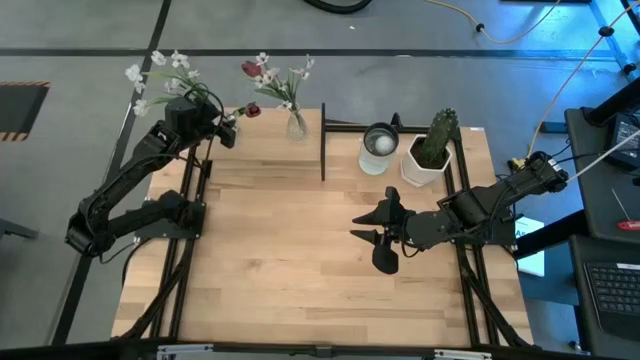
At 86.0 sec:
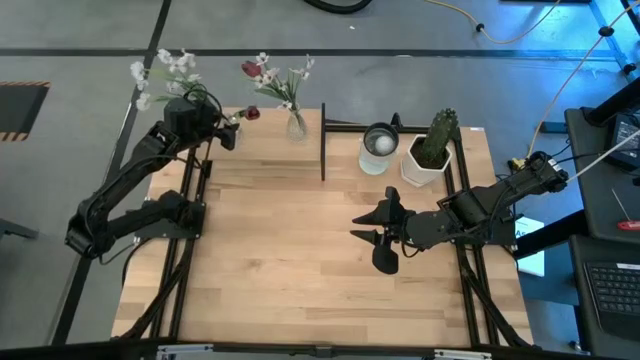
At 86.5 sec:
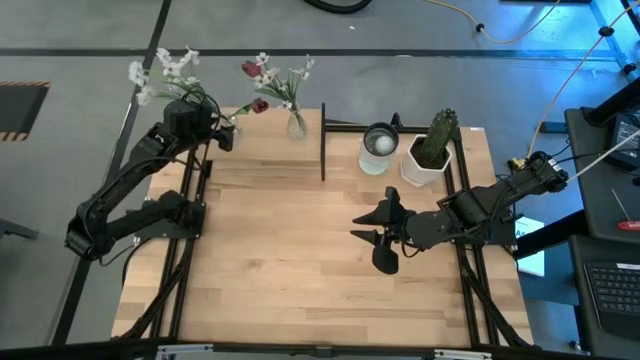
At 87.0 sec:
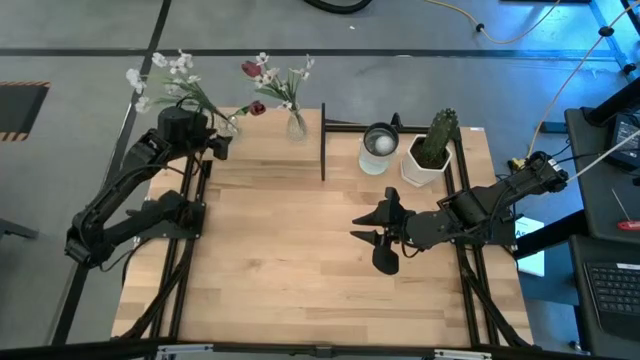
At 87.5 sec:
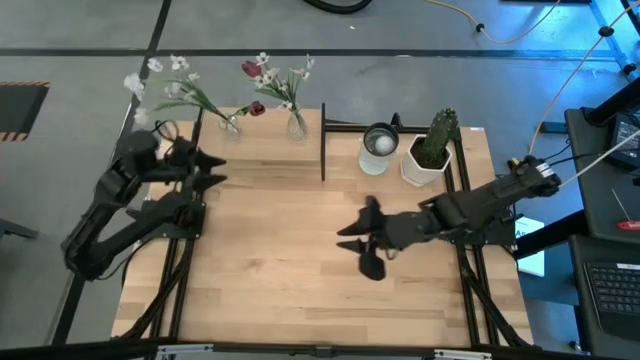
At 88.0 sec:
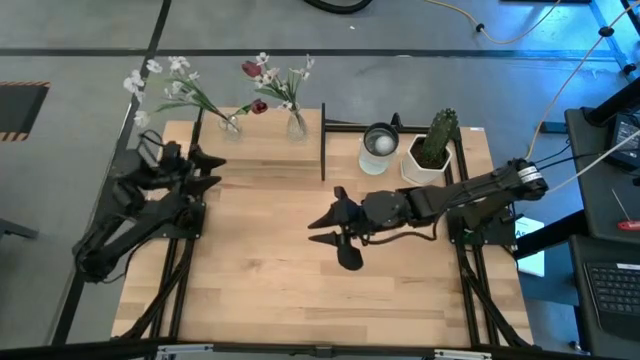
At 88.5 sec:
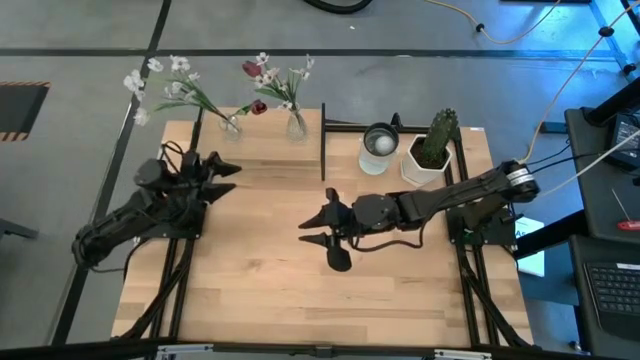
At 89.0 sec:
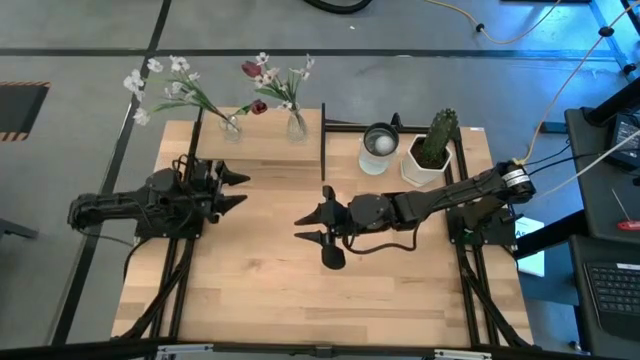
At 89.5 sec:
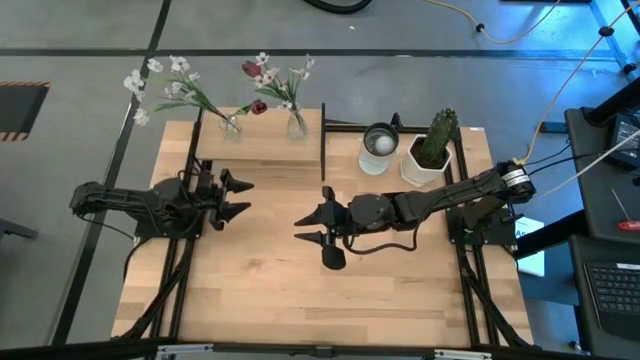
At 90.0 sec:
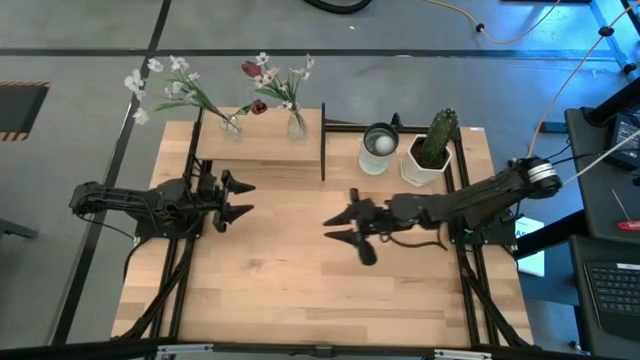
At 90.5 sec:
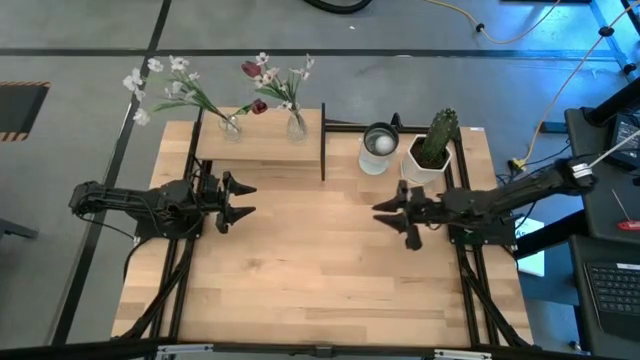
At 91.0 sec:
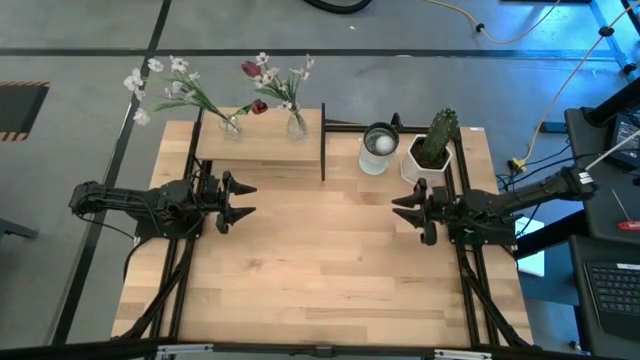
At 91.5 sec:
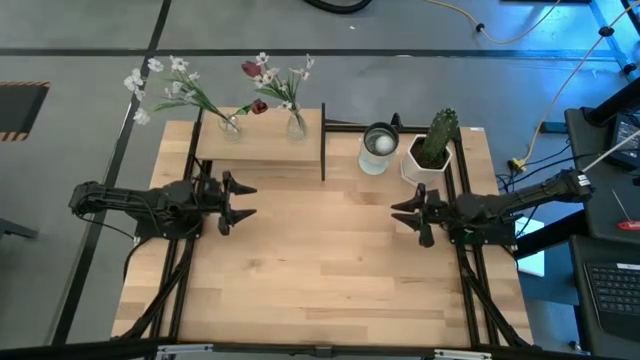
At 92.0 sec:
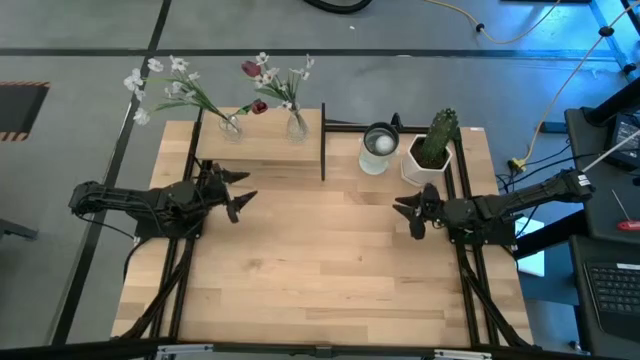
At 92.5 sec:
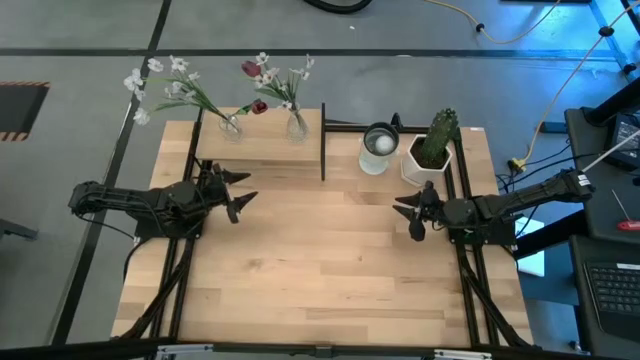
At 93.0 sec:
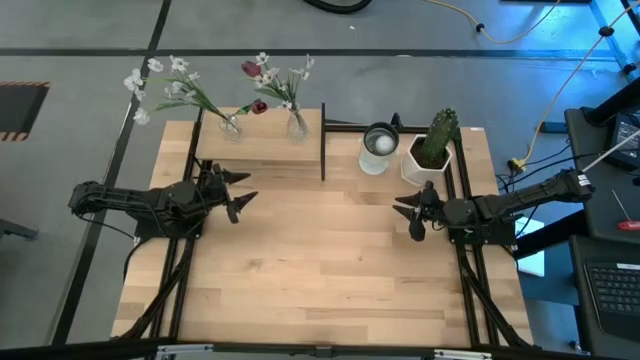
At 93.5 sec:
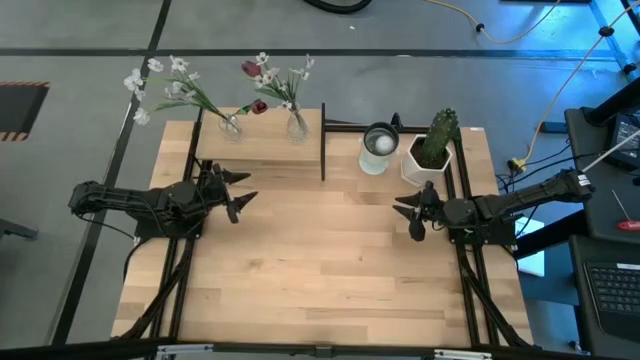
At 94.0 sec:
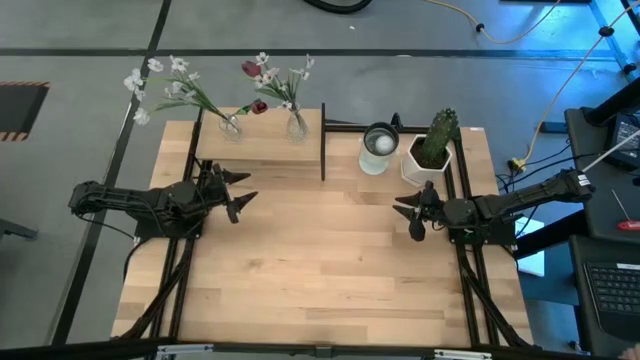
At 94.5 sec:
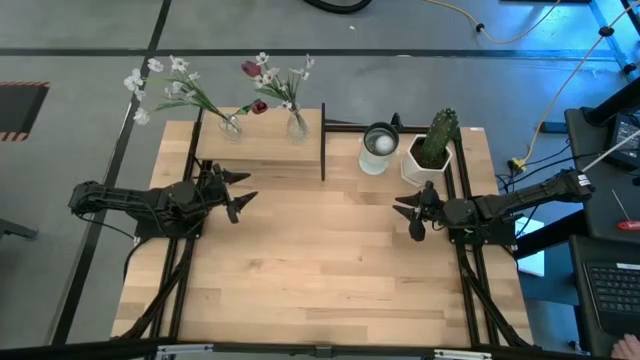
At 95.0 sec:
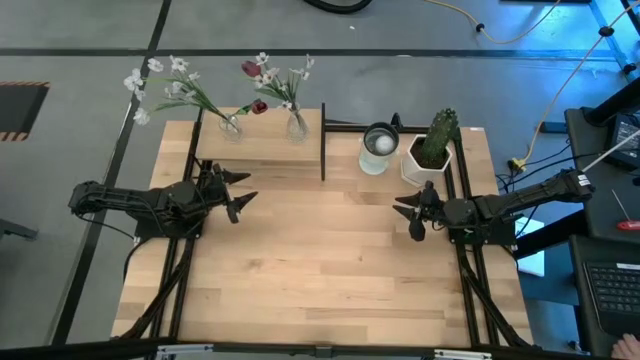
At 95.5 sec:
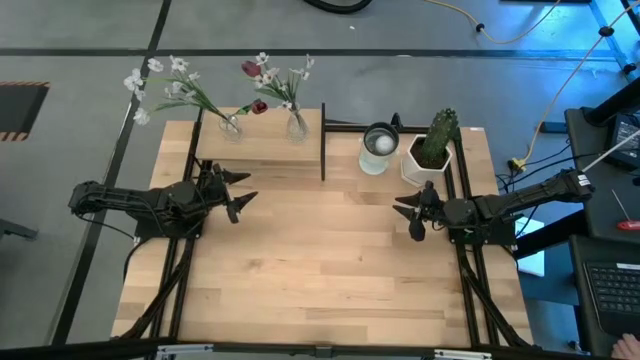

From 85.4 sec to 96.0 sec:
Task: Pick and place flowers into a vace then onto a shelf
Return to Home Position

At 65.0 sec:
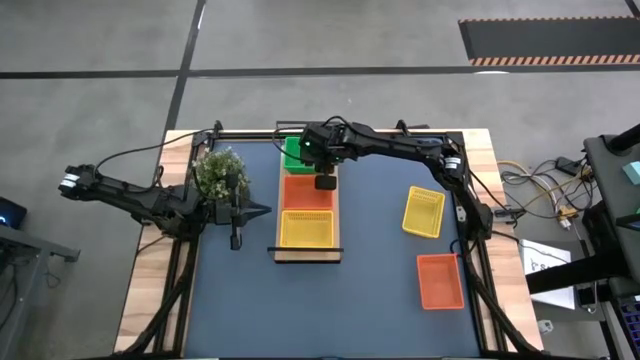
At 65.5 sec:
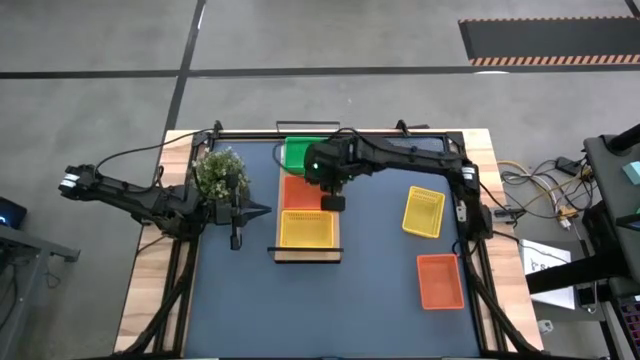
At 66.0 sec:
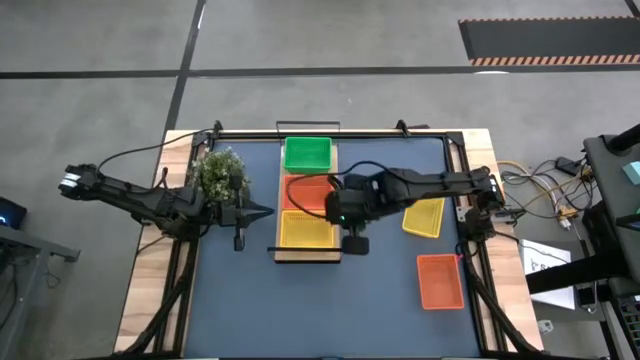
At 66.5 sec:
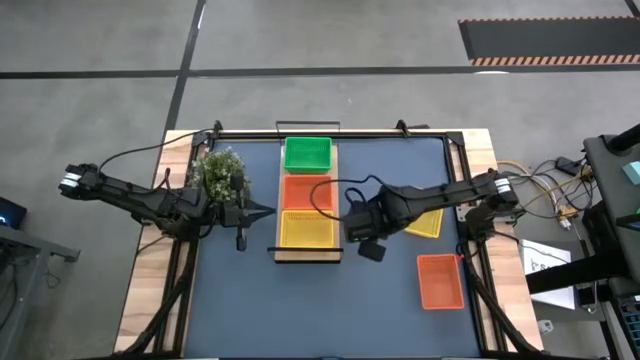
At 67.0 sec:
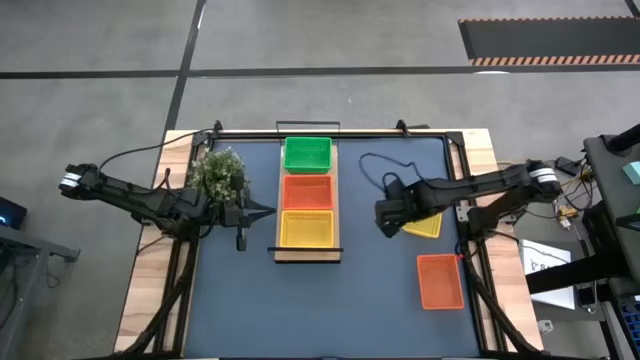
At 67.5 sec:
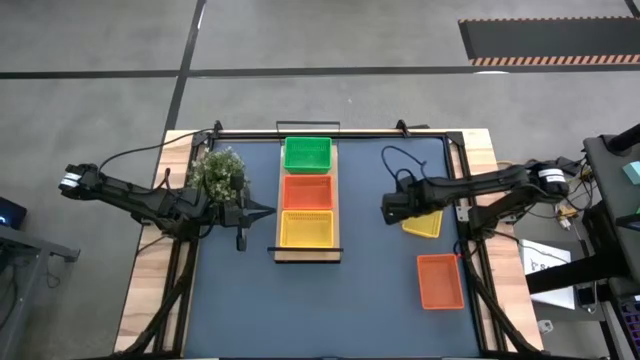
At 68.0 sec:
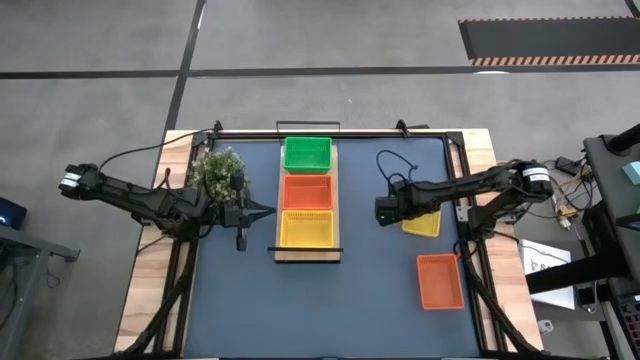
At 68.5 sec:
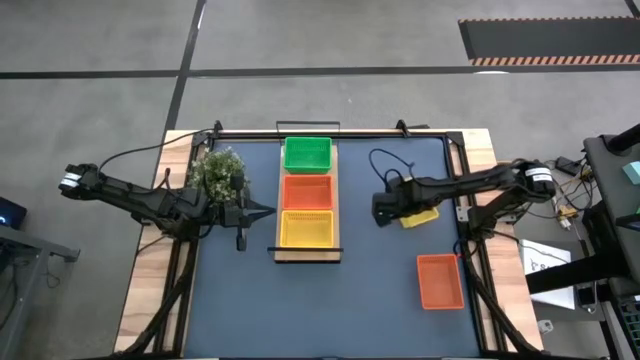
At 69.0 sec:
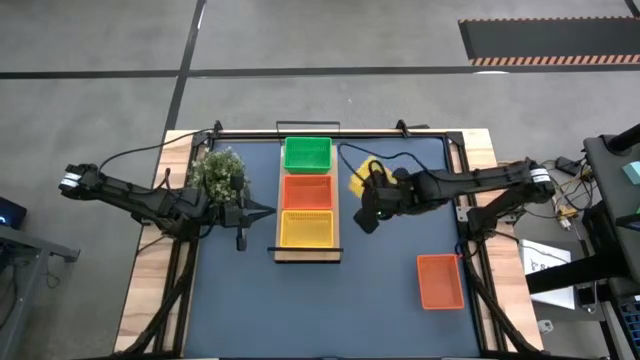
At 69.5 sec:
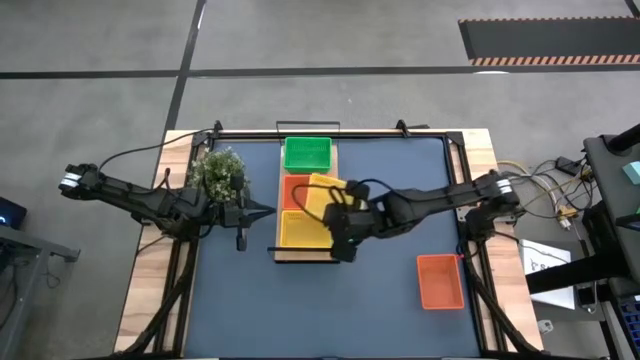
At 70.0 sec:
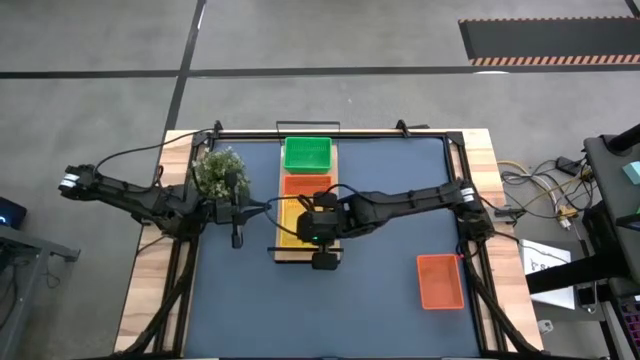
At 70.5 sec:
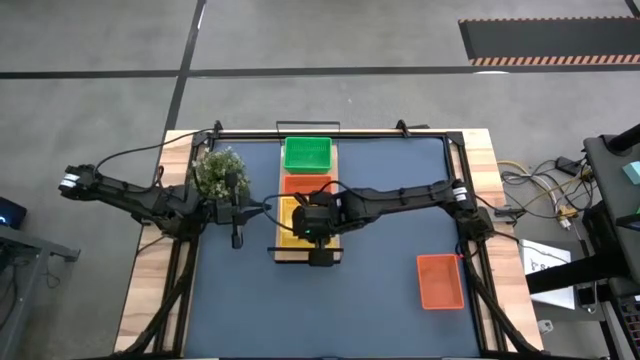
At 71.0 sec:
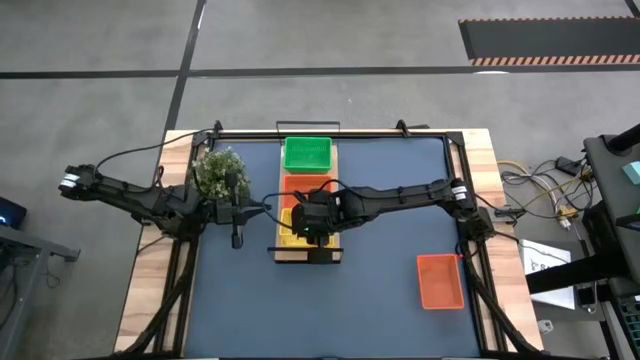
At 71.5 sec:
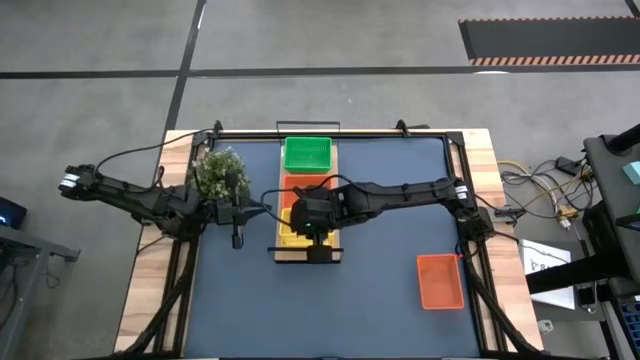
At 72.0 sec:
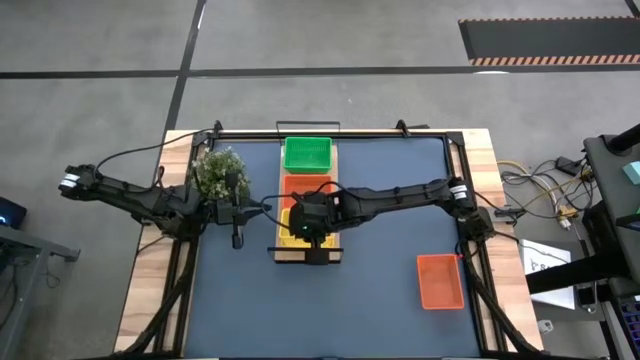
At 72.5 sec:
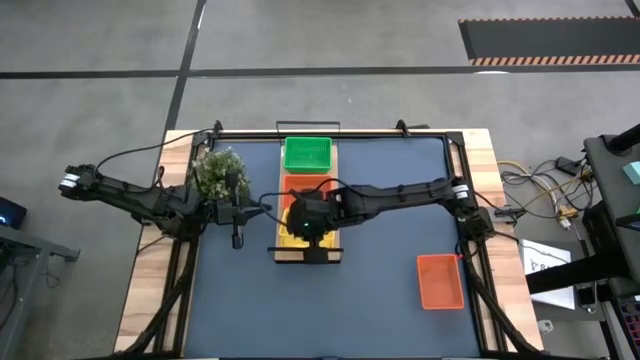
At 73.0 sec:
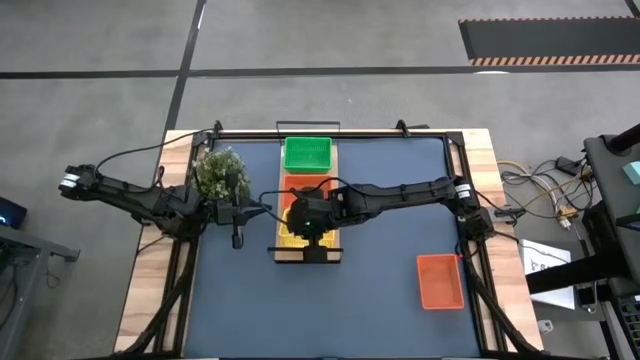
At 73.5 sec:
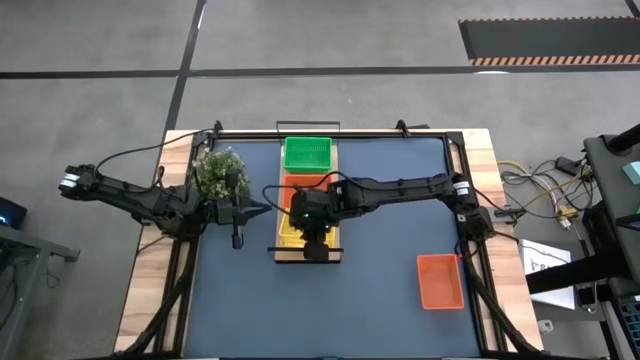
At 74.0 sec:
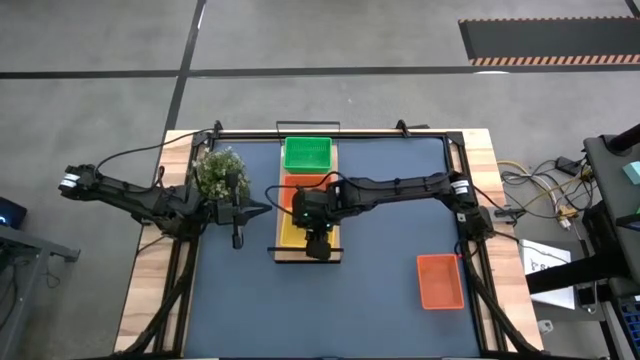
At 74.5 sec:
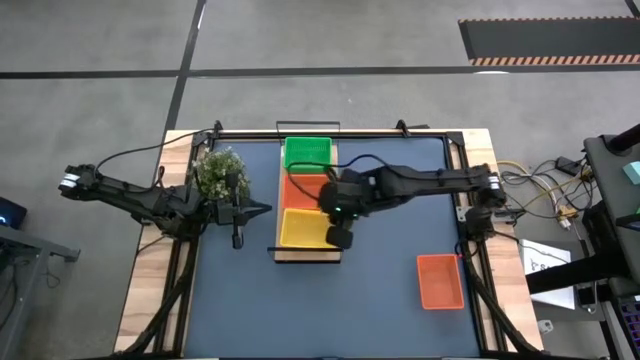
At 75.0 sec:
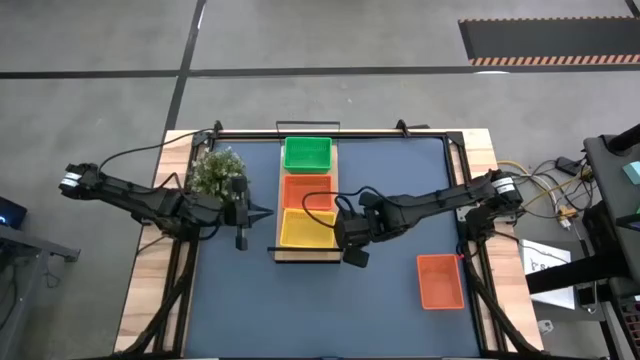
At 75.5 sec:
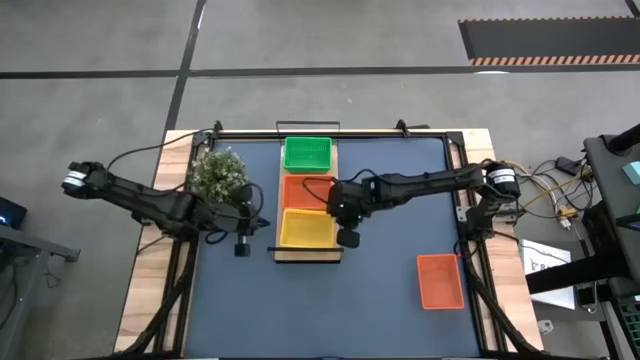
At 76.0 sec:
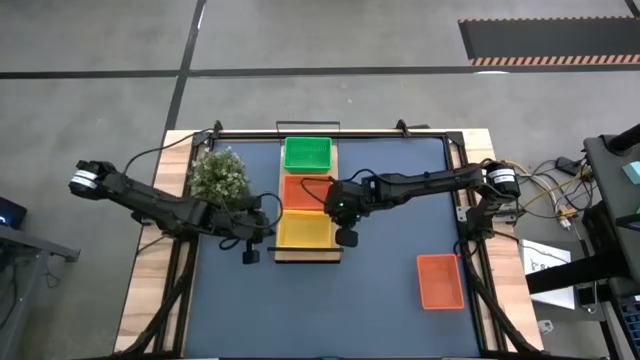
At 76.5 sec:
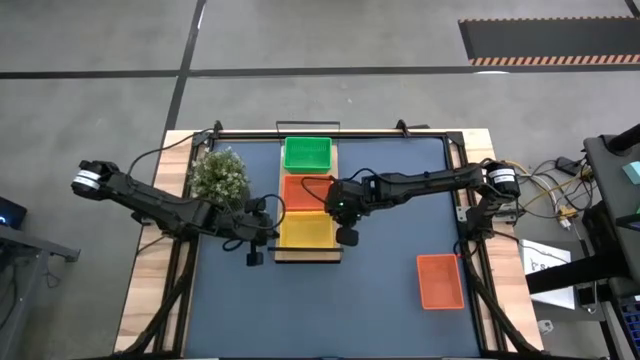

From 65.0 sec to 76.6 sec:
Task: Stack baskets on shelf by color
Stack the yellow bin on the yellow bin on the shelf
